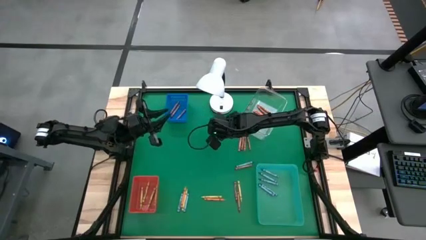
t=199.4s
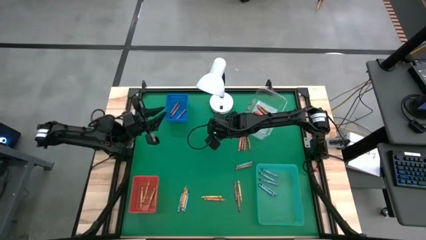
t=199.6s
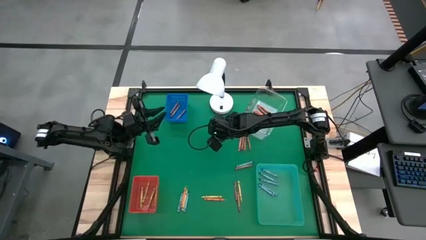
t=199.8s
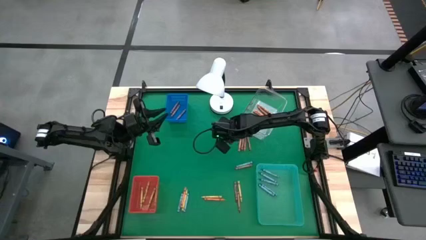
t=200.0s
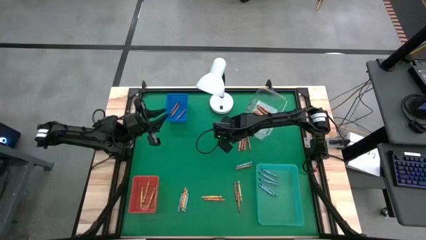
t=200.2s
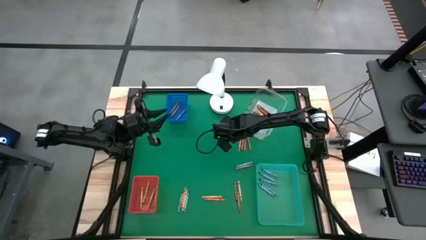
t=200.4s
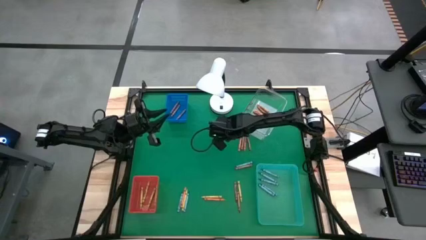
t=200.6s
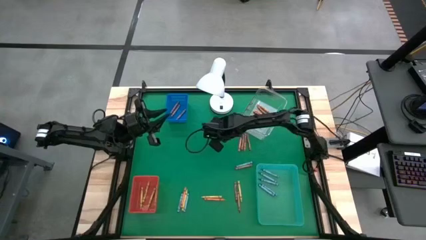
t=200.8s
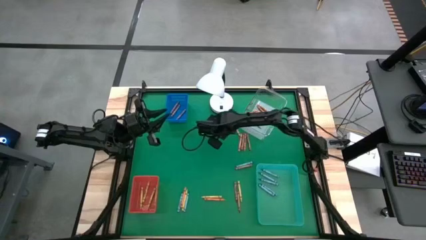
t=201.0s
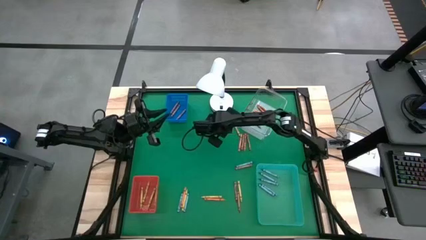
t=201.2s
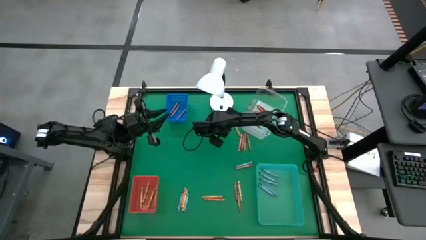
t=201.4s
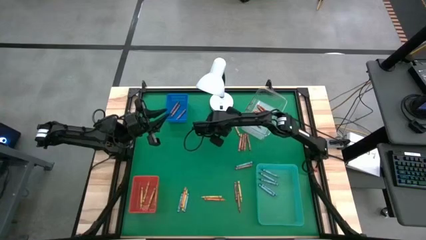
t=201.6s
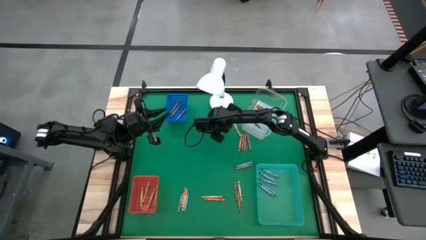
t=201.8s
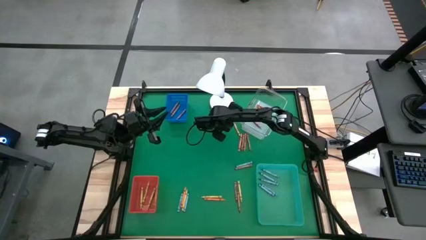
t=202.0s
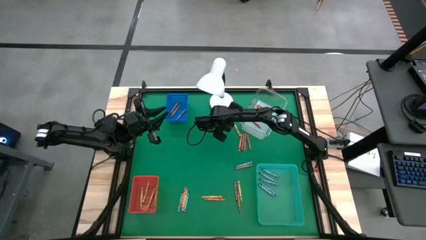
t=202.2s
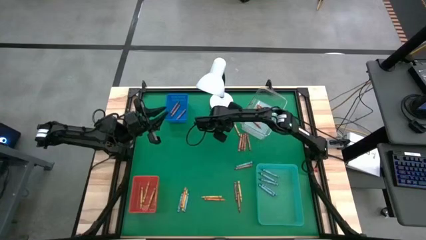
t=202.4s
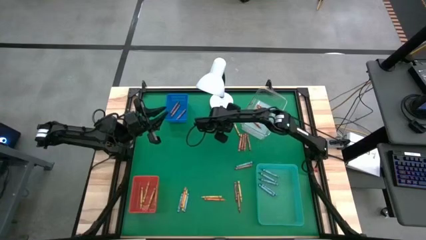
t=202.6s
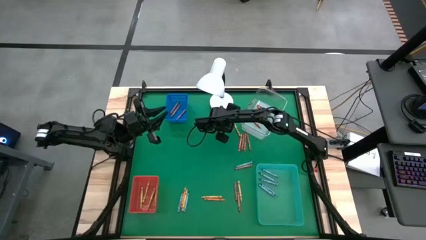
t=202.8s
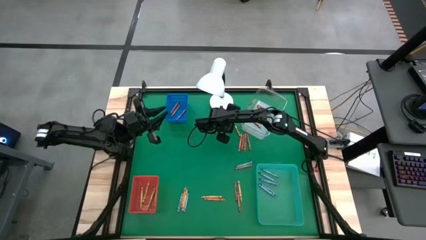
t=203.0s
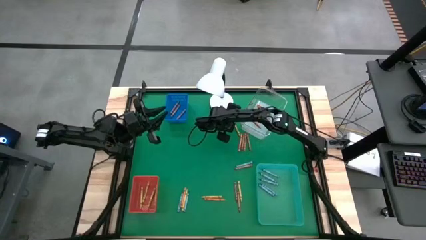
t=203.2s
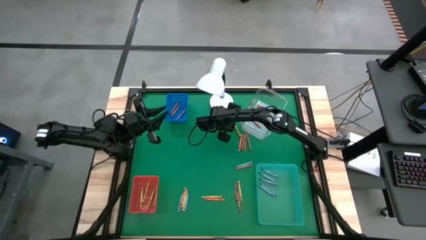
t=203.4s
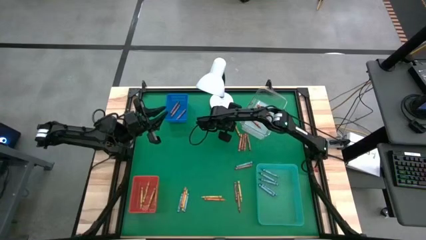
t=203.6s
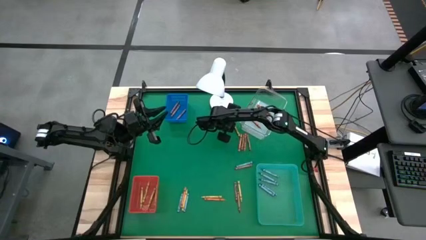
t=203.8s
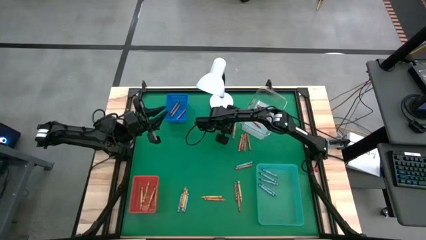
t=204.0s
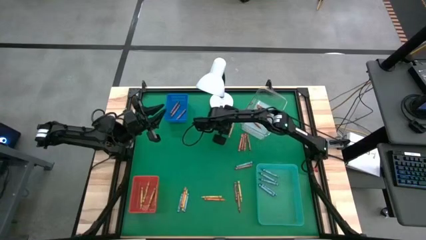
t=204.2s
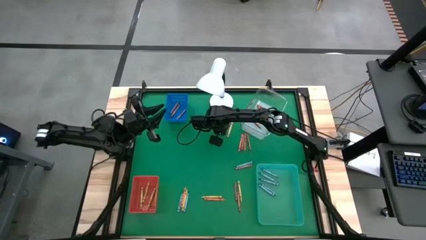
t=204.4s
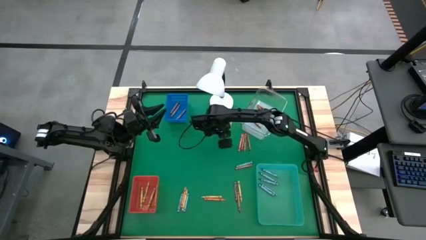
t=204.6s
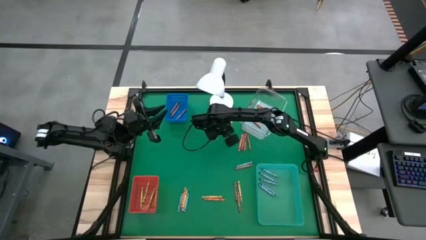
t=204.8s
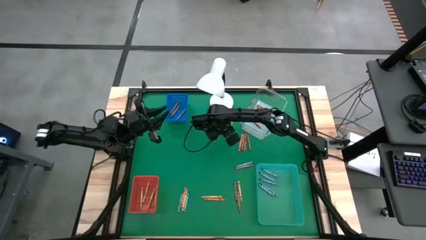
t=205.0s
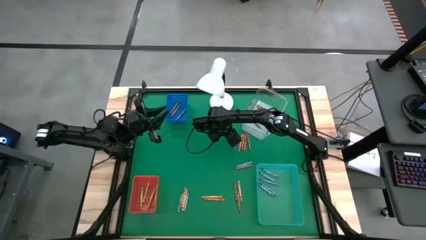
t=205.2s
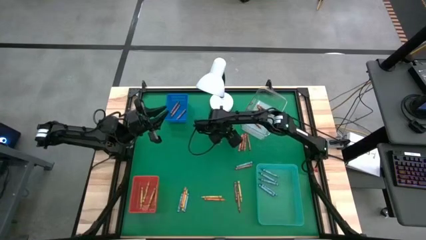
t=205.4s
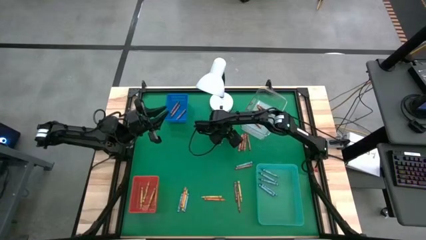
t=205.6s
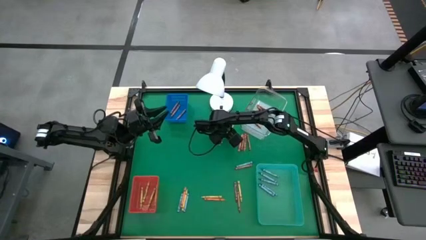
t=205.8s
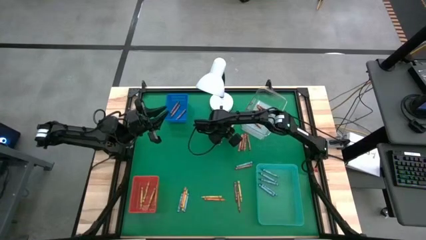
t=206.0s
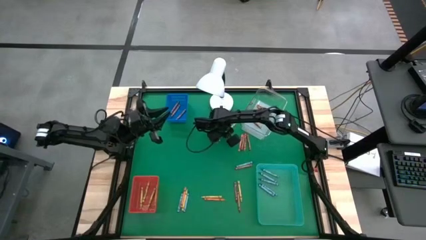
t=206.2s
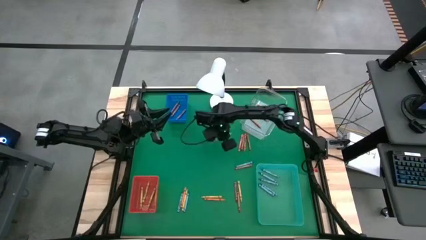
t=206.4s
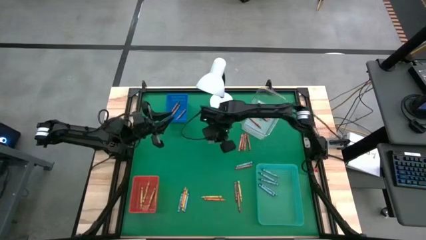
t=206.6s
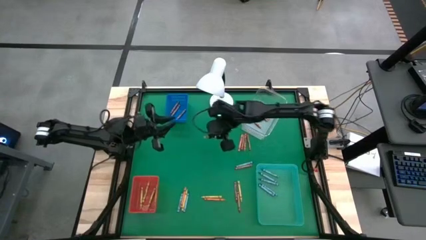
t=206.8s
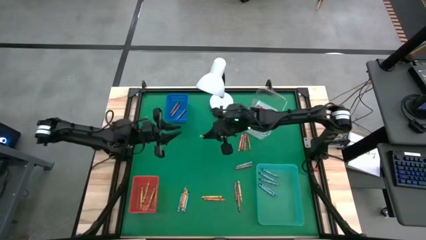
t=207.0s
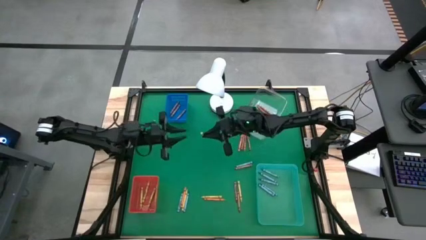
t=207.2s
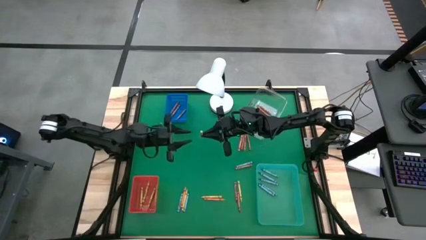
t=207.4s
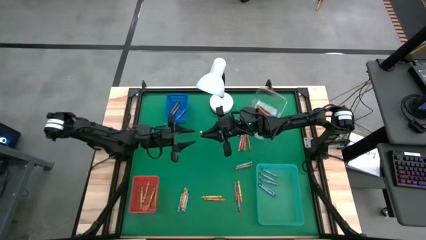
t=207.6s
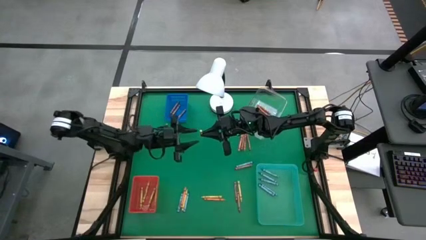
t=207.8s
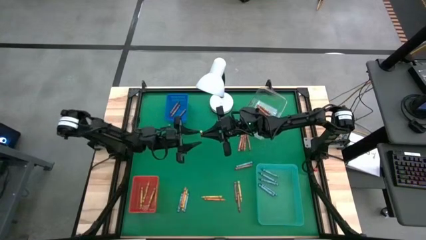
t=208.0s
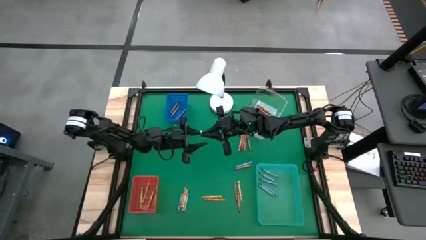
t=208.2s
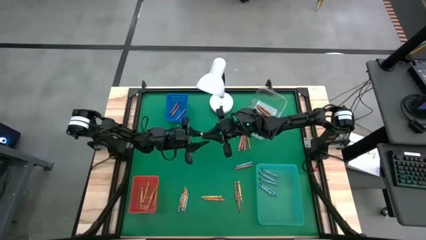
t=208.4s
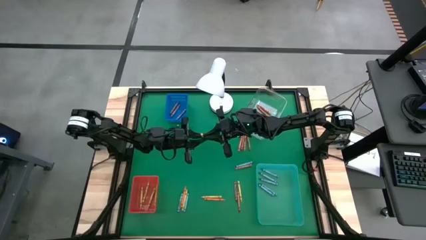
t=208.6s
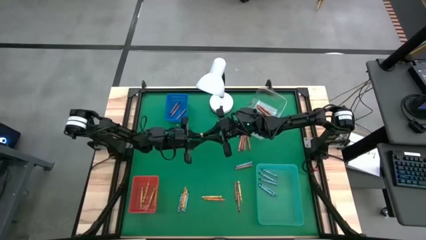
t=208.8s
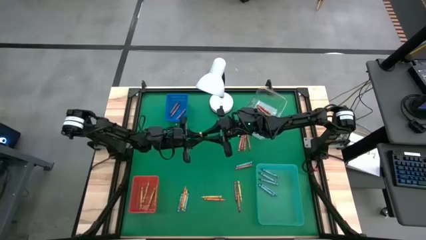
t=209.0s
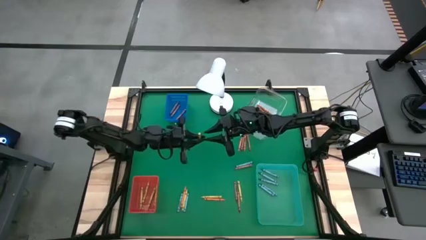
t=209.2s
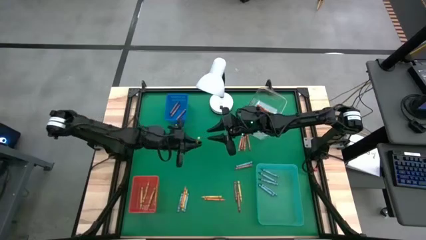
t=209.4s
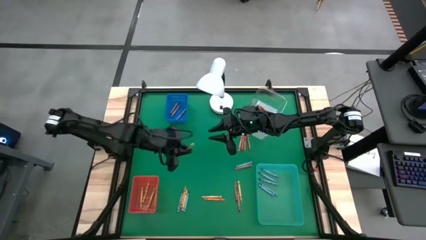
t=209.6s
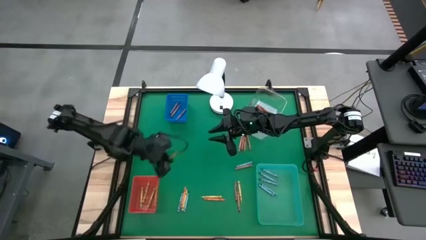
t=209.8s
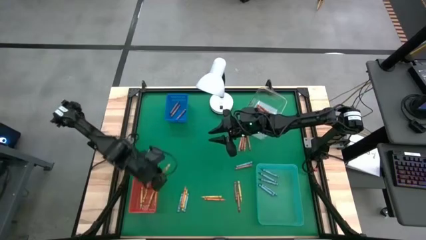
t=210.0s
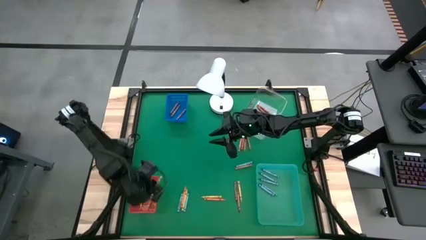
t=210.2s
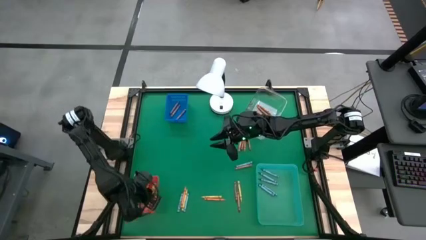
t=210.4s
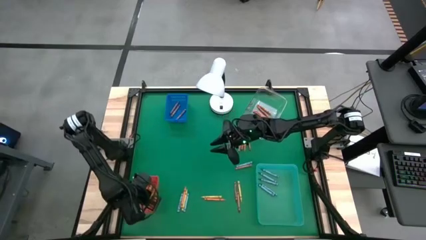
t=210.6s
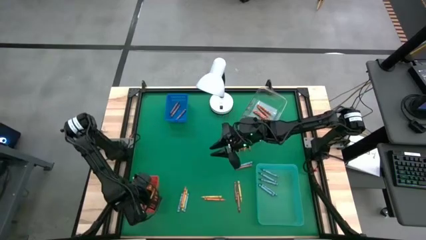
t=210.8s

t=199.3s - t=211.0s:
Task: Sort crayons
Put the yellow crayon into the red bin
